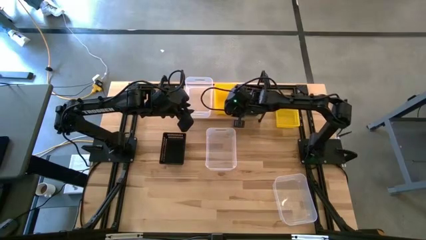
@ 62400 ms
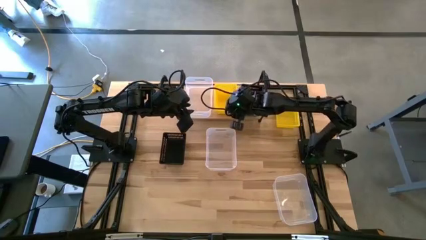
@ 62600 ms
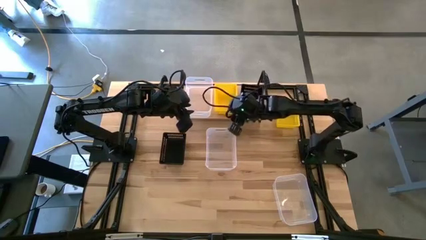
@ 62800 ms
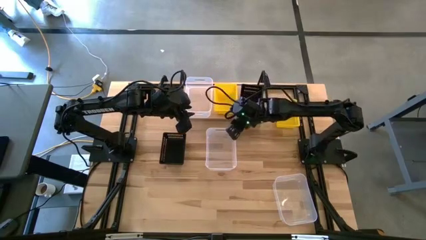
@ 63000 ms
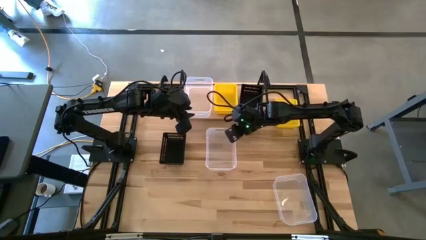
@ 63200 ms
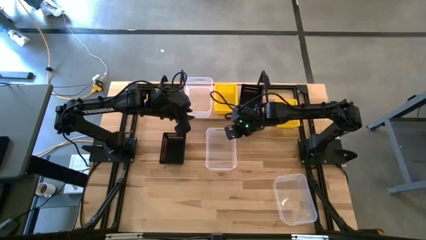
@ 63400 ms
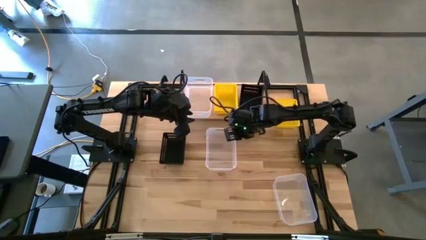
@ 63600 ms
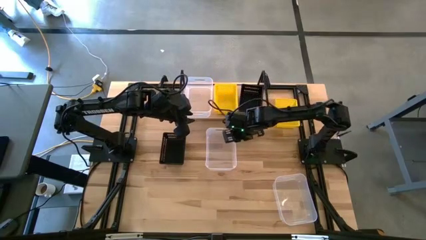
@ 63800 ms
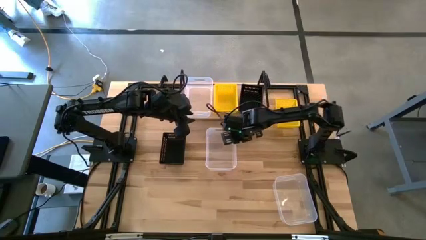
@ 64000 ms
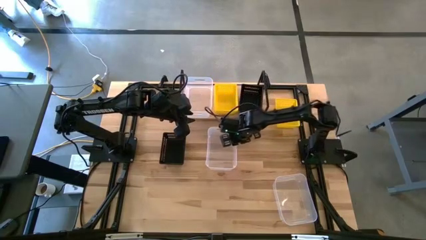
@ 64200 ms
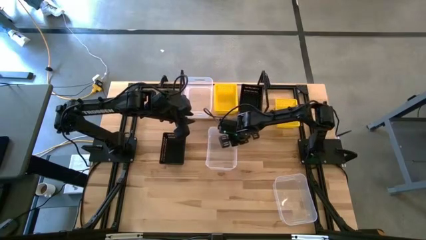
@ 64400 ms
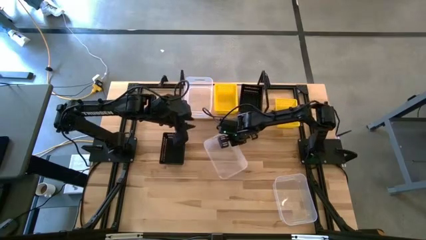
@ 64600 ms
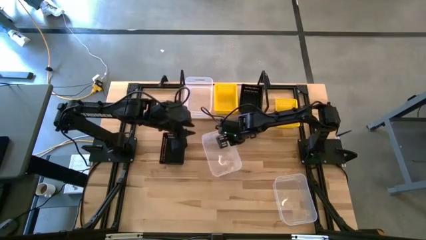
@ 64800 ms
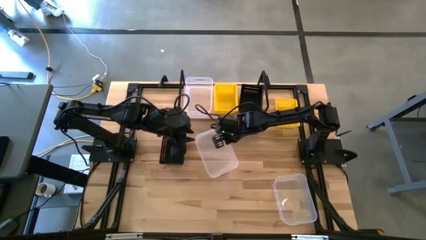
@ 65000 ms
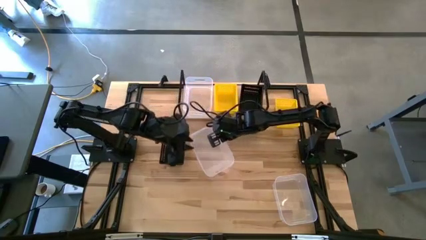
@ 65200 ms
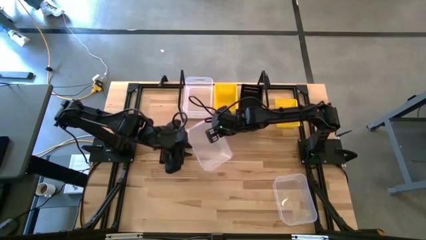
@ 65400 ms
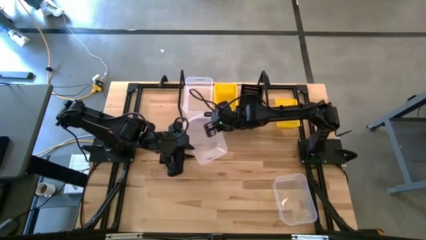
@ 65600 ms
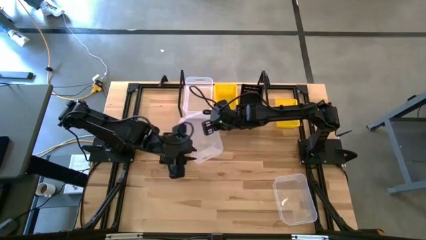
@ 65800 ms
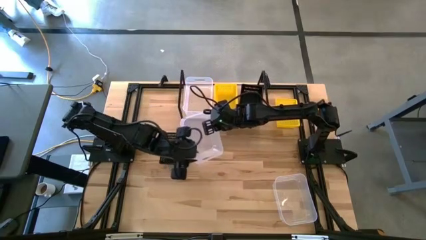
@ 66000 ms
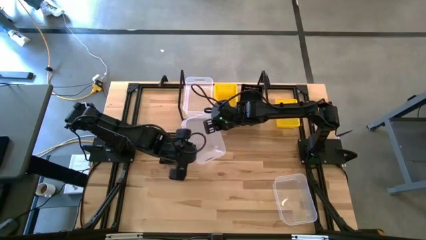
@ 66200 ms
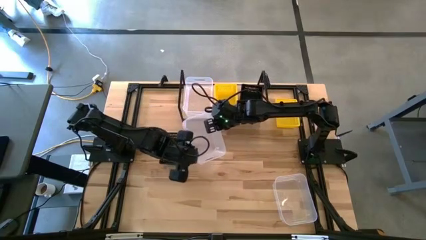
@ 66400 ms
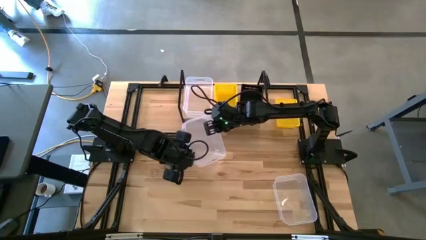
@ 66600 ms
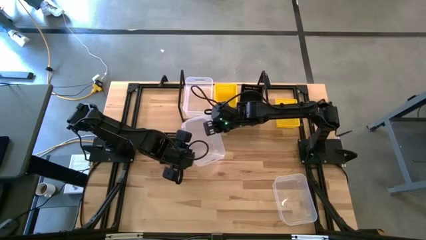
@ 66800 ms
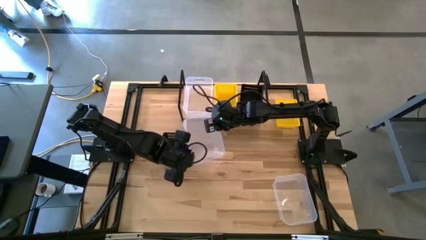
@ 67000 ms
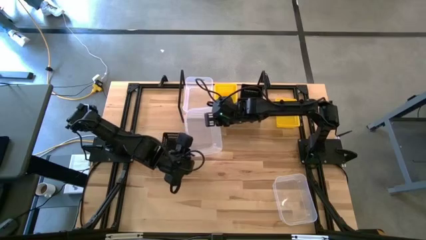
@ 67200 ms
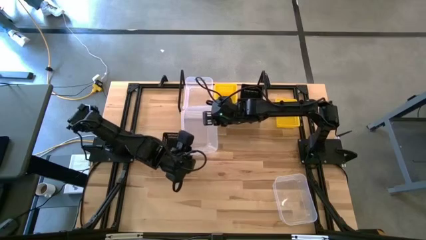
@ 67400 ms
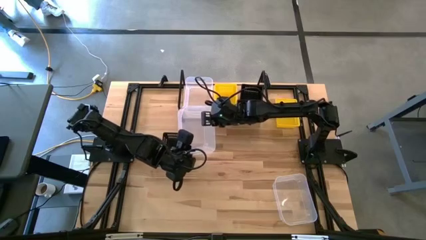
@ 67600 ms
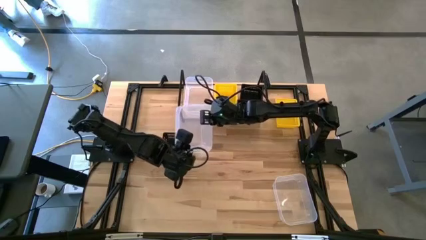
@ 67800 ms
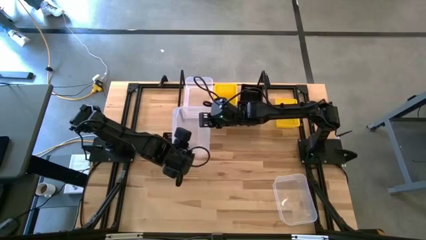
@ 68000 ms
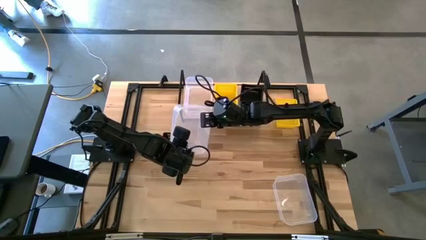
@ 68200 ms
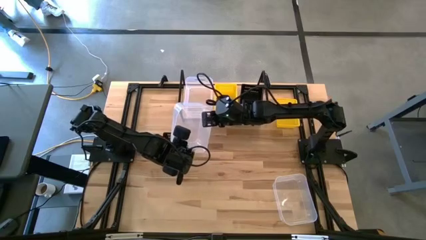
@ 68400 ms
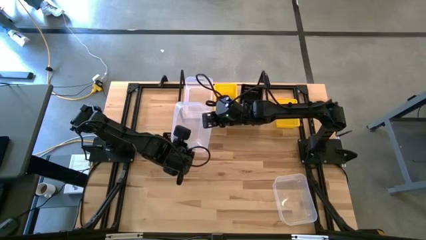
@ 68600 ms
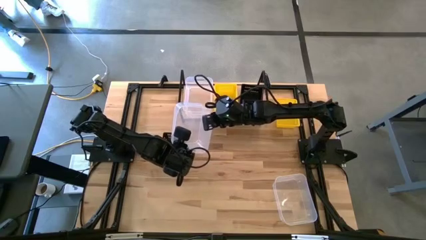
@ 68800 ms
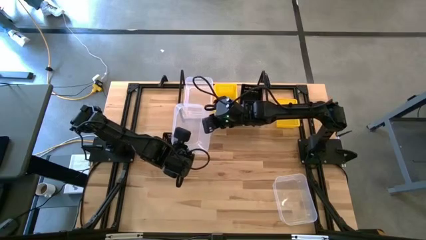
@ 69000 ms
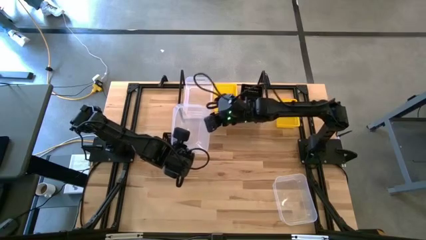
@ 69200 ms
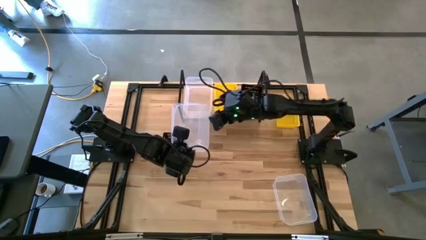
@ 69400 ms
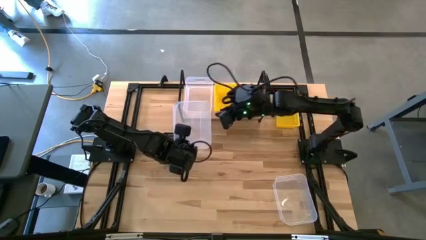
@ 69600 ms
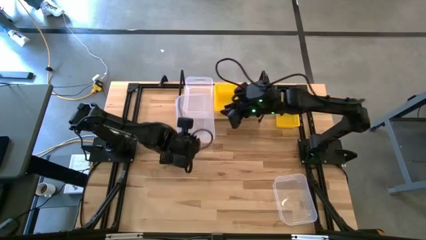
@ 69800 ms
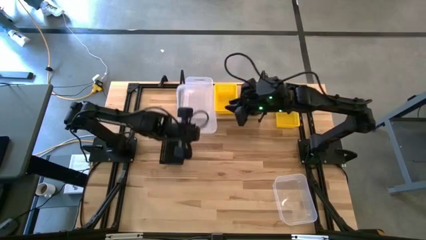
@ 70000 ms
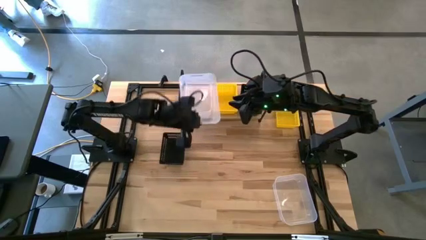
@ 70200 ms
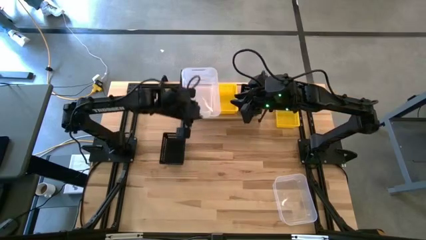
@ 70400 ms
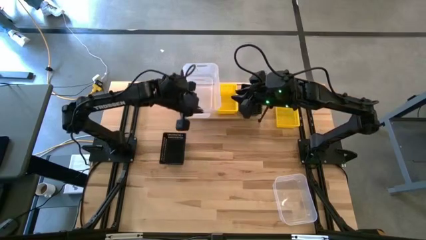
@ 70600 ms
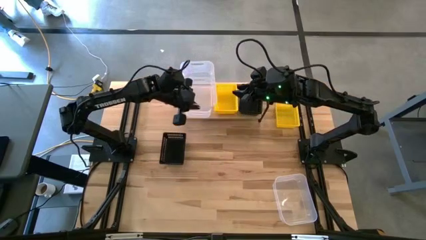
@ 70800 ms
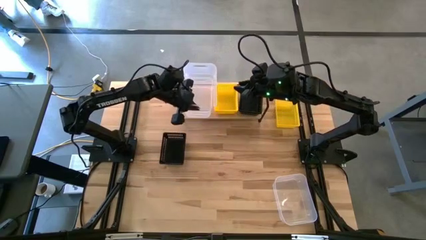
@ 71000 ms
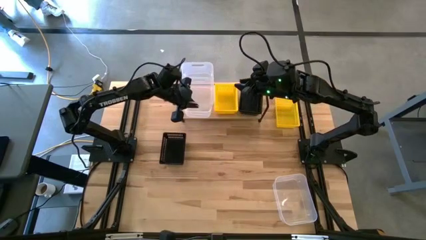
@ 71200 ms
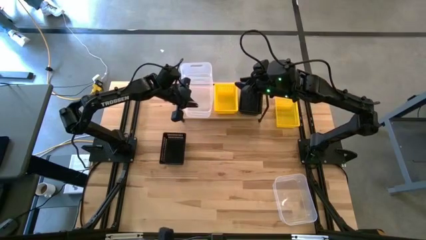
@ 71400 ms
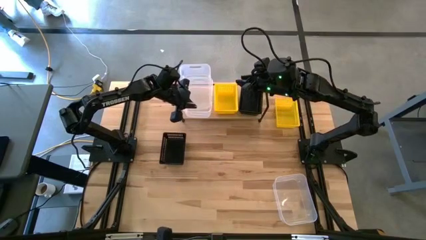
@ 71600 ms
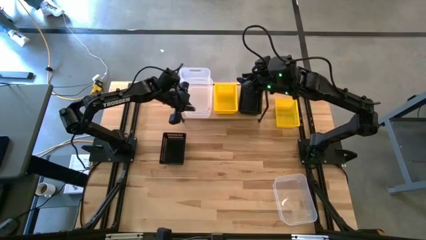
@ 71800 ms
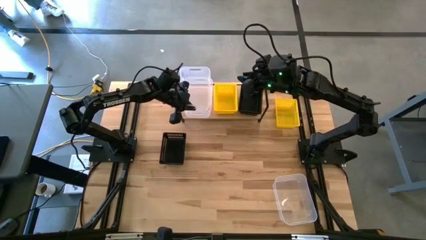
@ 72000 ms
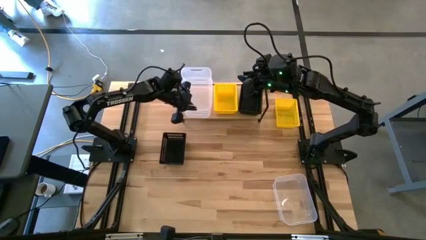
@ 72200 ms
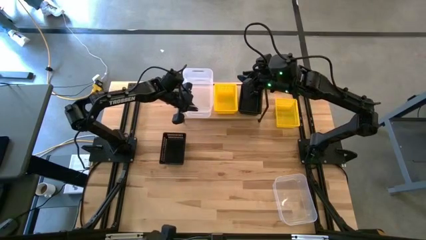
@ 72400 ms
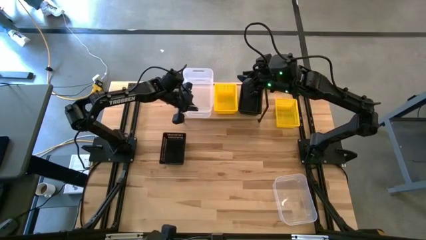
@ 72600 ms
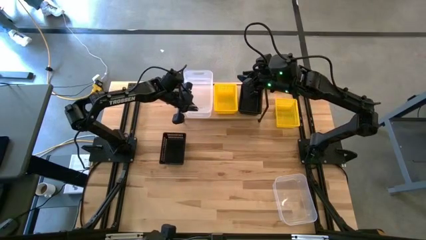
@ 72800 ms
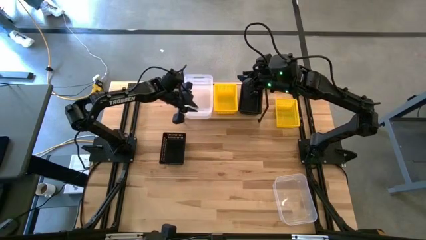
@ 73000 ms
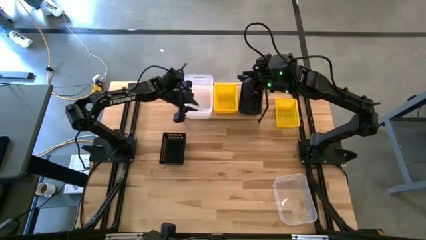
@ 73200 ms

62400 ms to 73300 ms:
Task: Stack baskets on shelf by color
Stack the top transparent bin on the transparent bin on the shelf

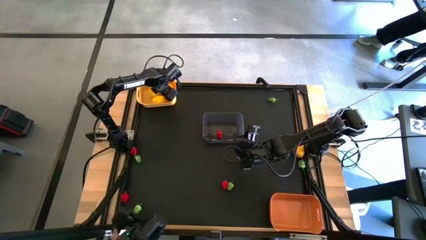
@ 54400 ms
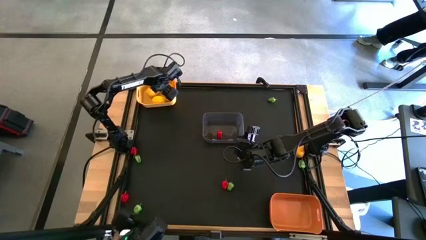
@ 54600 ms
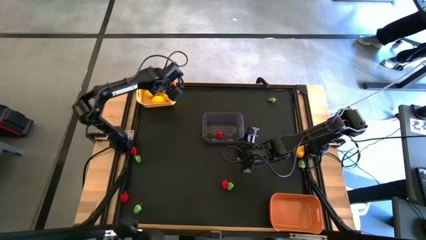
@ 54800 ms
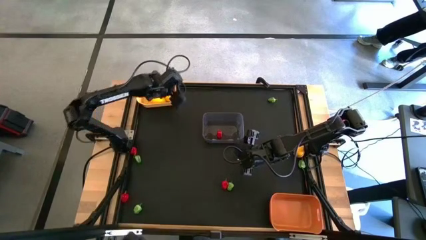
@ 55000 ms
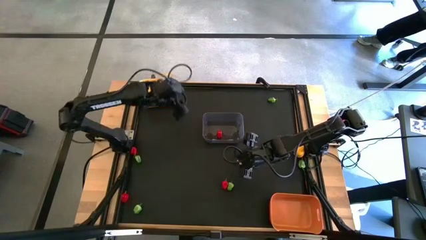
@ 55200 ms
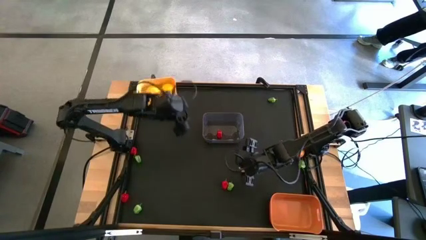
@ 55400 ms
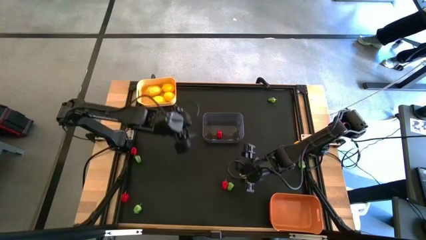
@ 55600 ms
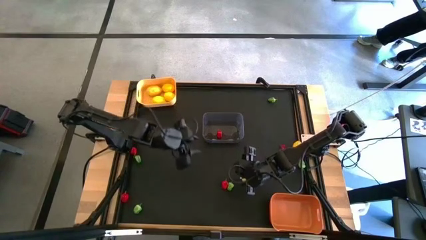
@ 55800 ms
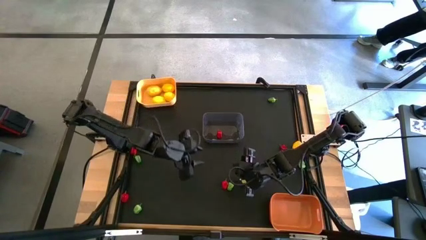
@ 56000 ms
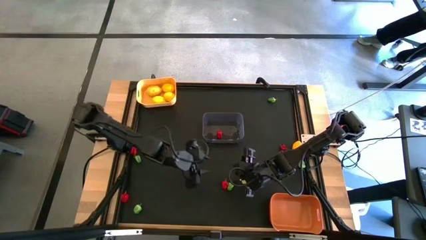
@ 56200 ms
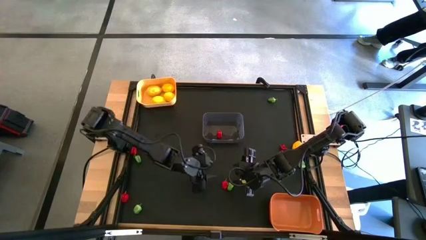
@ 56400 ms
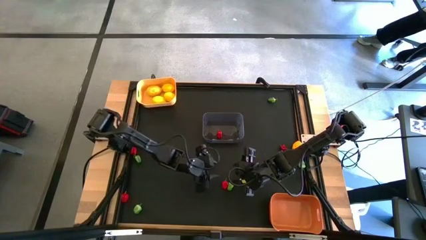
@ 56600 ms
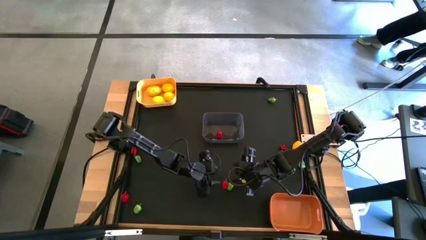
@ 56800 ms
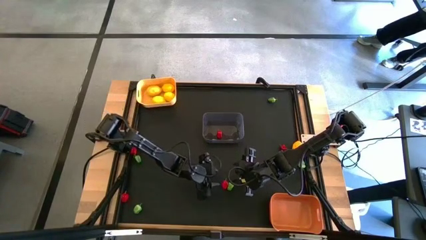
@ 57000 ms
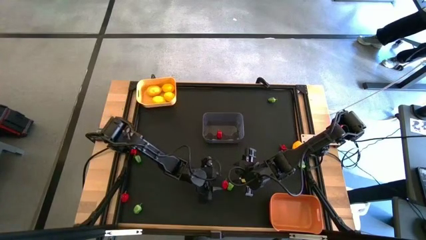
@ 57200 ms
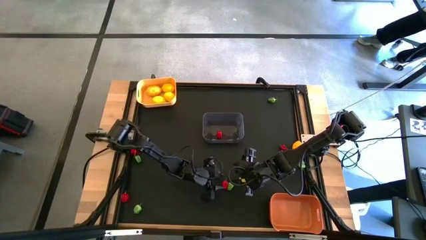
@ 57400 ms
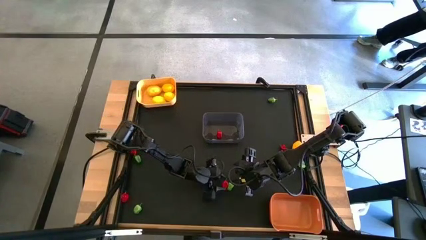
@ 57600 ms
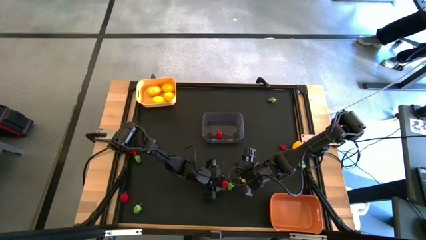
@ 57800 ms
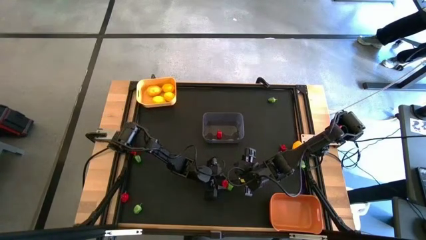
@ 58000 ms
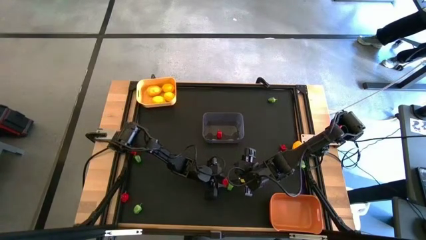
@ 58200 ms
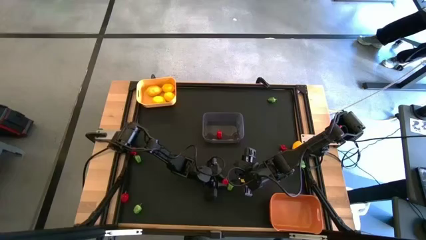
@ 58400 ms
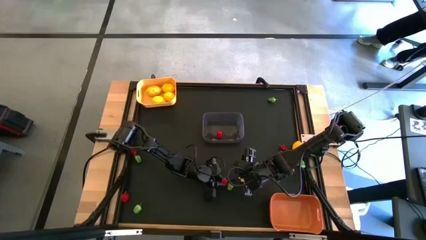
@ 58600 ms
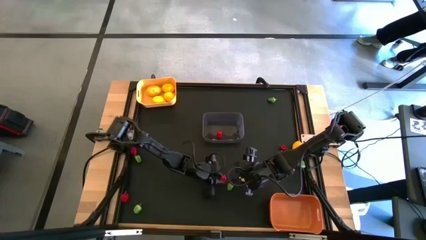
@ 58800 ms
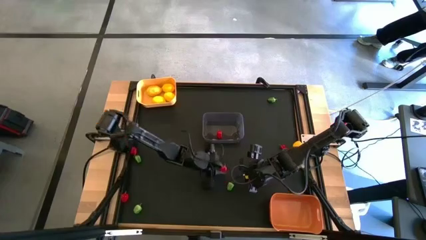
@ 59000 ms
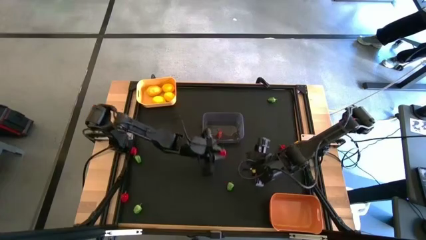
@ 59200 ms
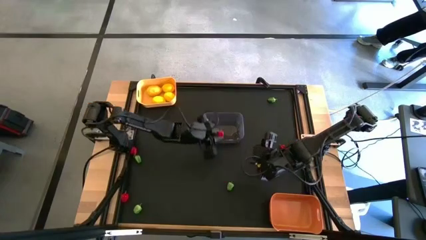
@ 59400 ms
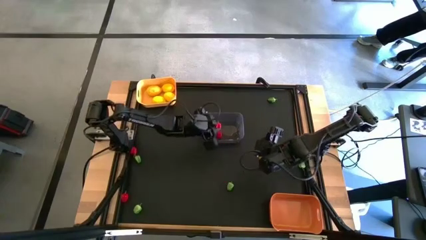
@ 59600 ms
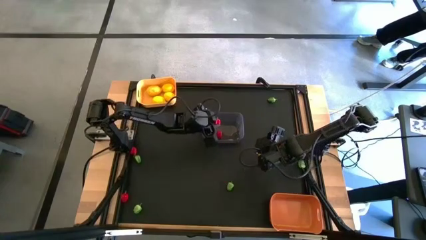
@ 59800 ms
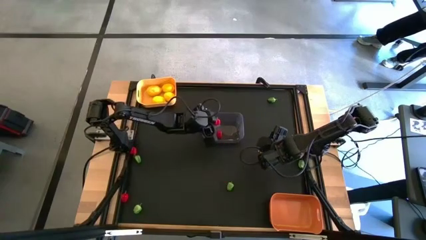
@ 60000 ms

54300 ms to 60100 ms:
Task: Sort produce into baskets
Put the red bell pepper into the transparent bin
